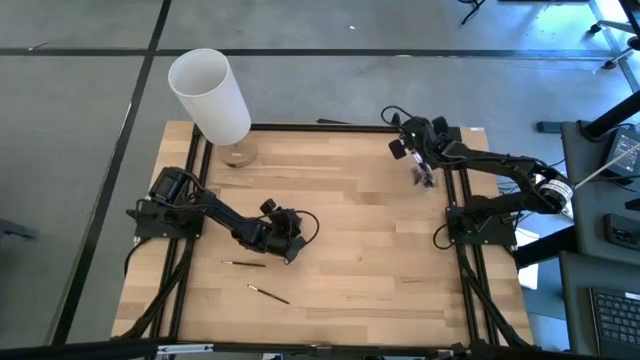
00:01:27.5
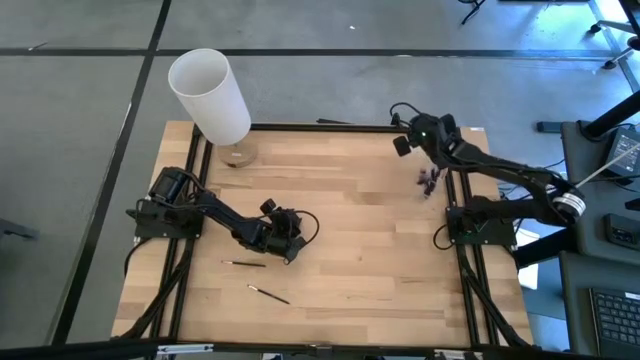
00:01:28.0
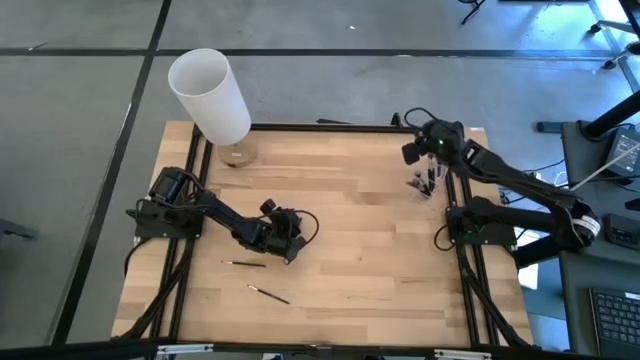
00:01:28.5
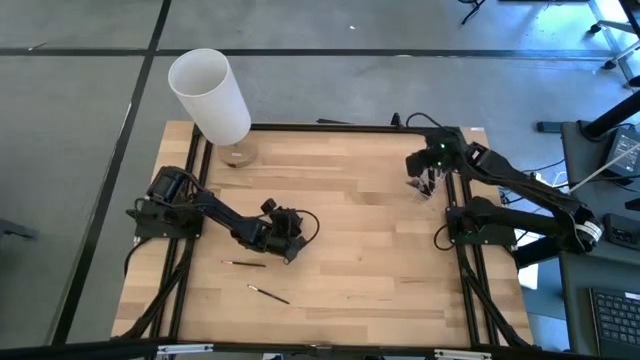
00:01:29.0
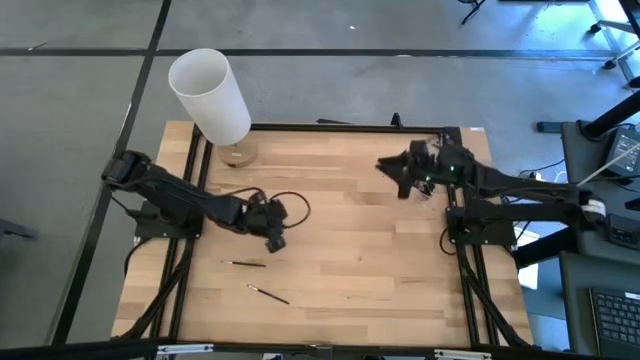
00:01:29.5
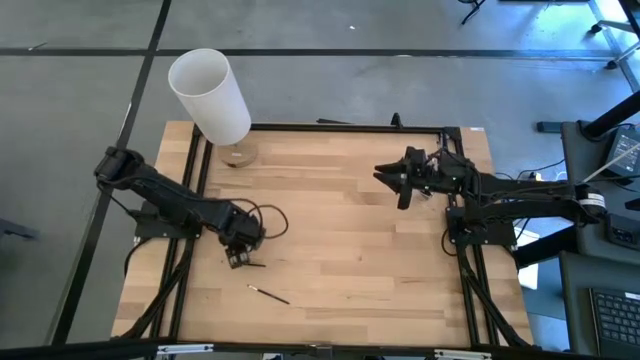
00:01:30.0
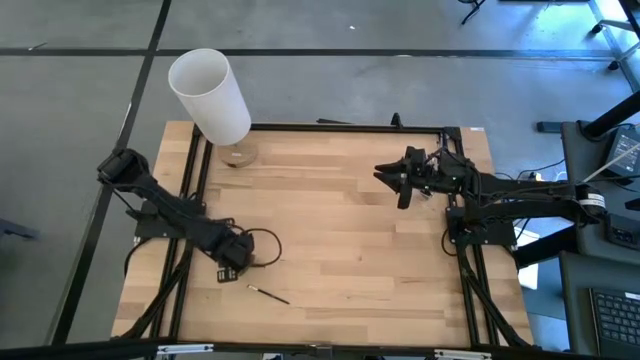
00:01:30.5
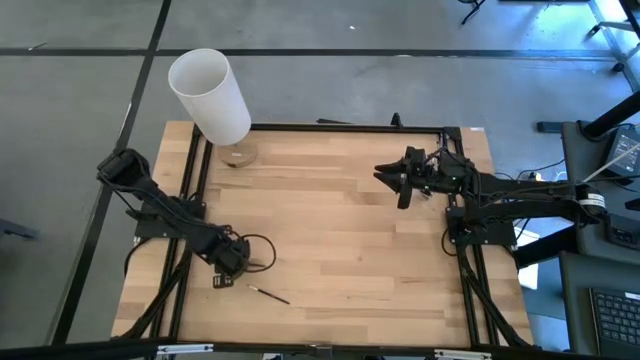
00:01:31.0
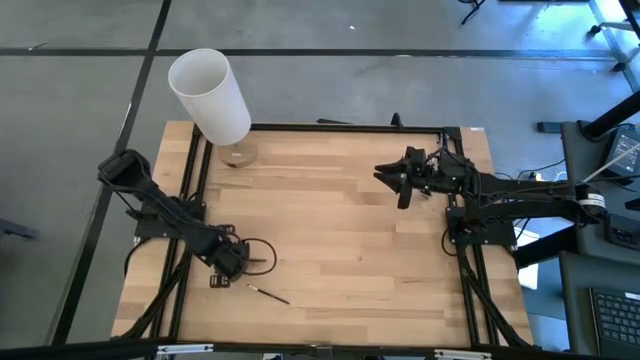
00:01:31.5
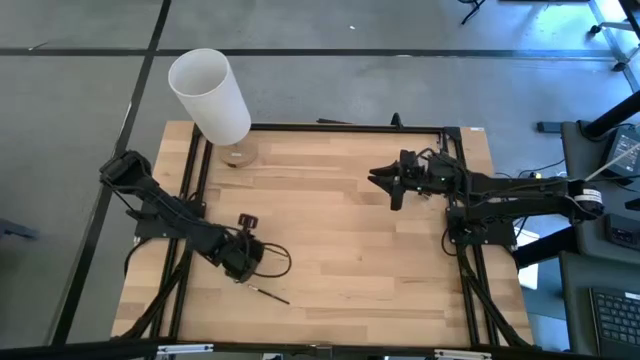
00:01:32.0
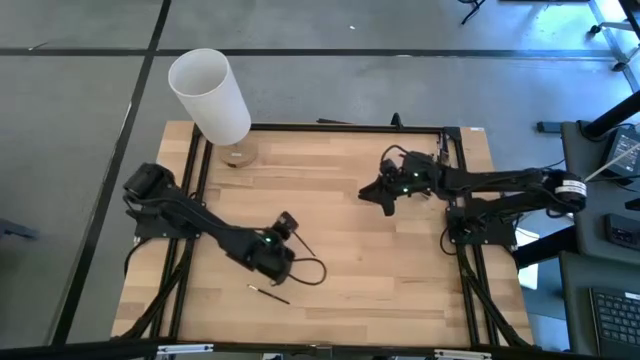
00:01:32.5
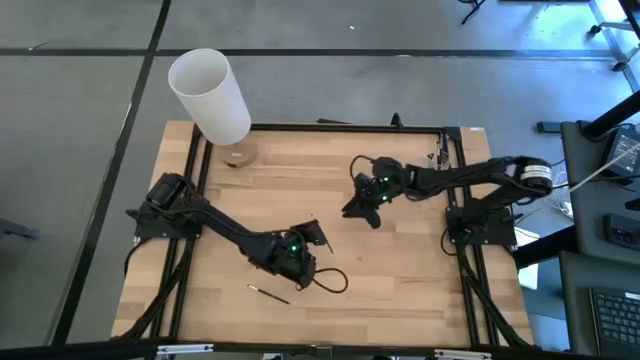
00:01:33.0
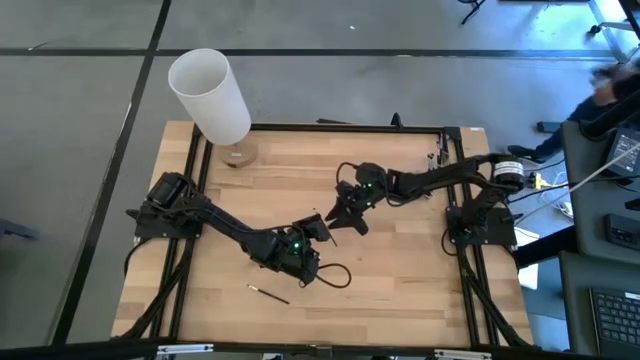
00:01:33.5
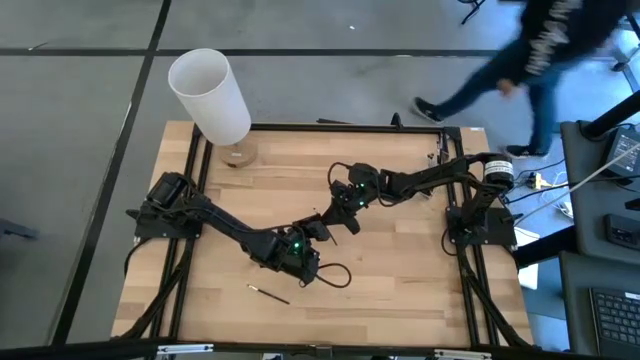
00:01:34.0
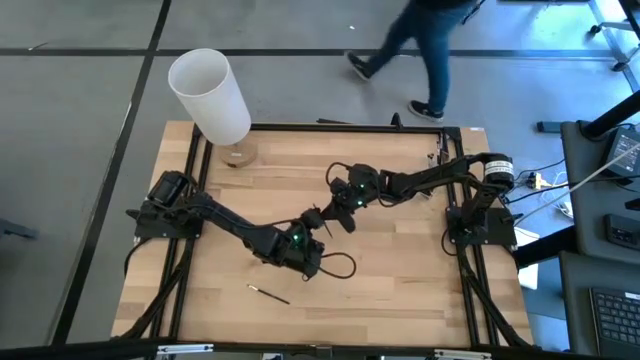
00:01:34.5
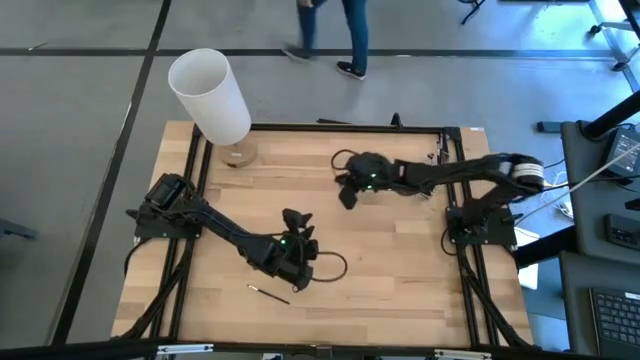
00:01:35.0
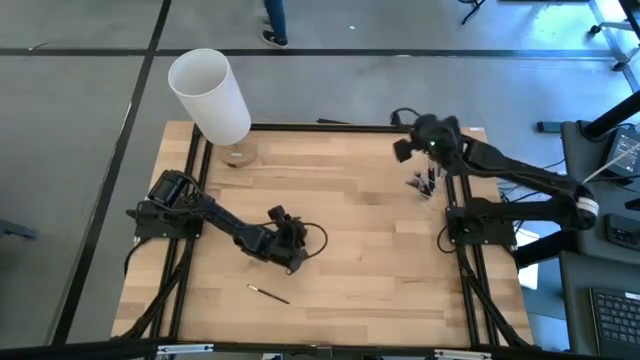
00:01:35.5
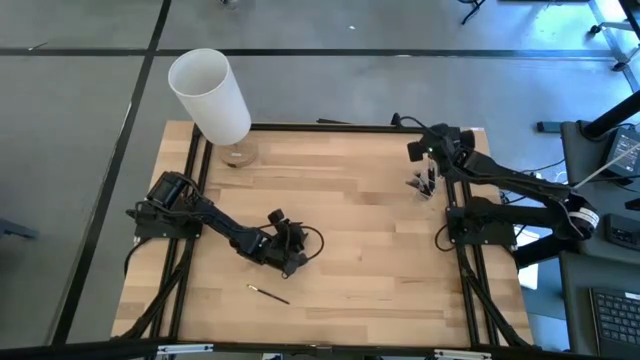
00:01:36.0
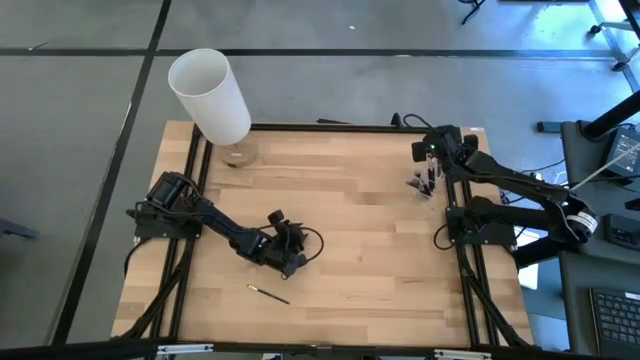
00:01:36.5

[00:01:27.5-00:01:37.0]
Task: Sort items
Put the lip brush into the top section of the transparent organizer

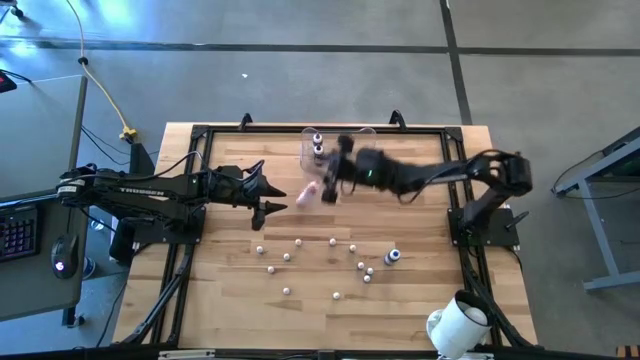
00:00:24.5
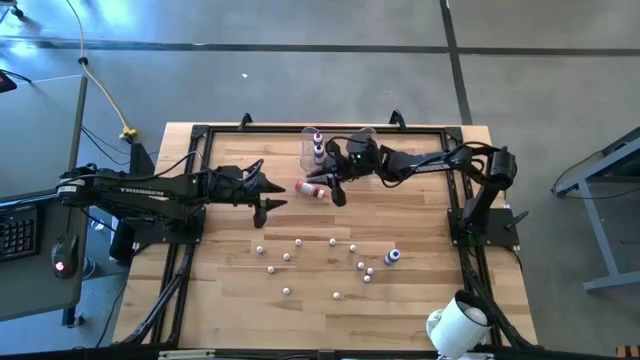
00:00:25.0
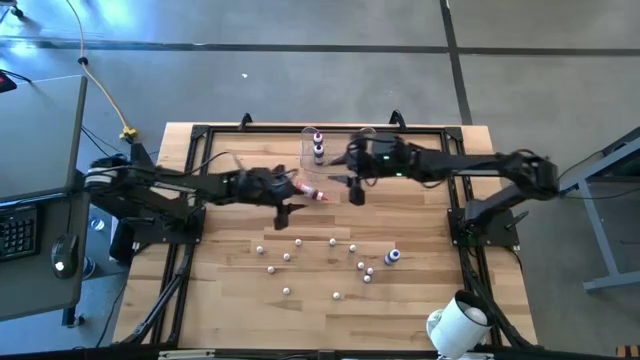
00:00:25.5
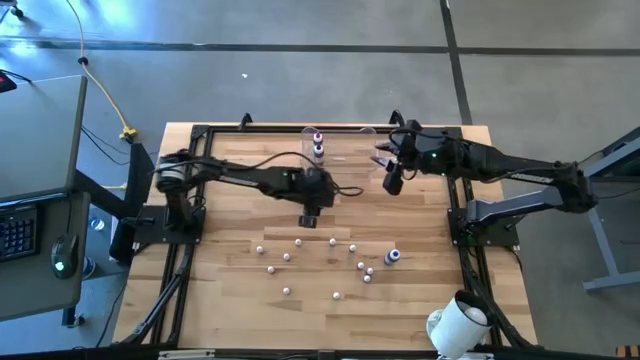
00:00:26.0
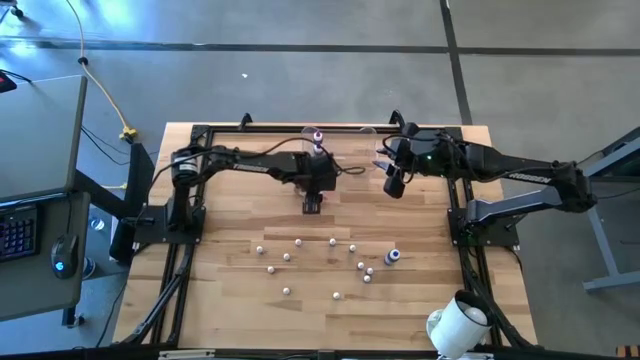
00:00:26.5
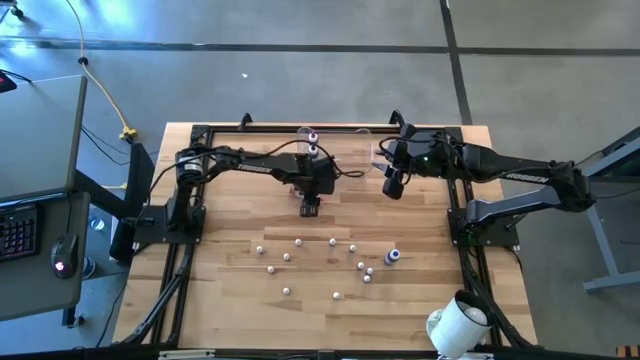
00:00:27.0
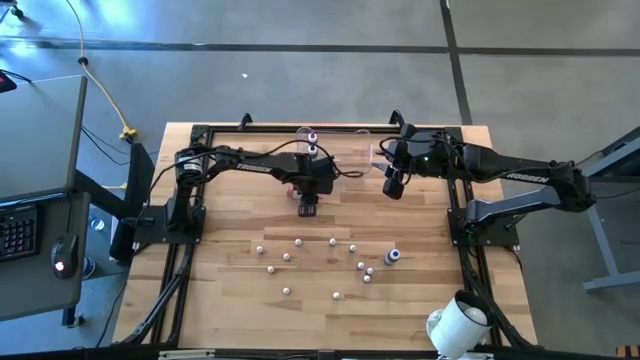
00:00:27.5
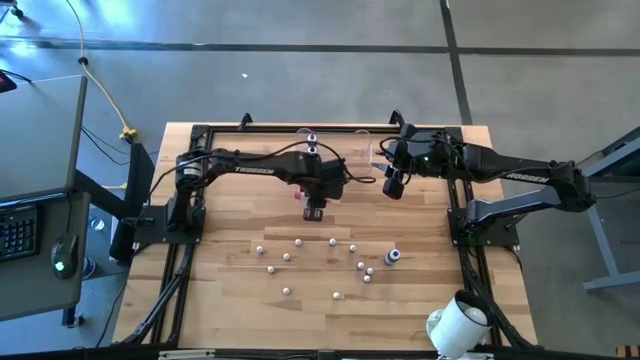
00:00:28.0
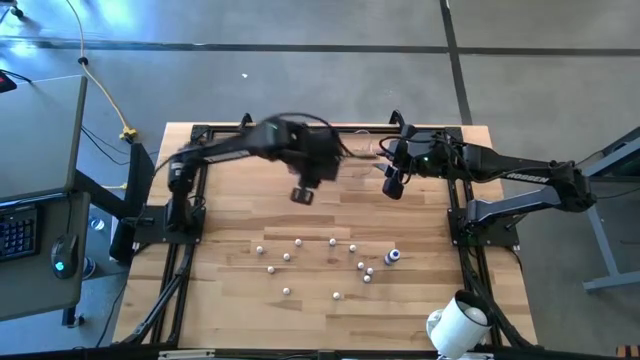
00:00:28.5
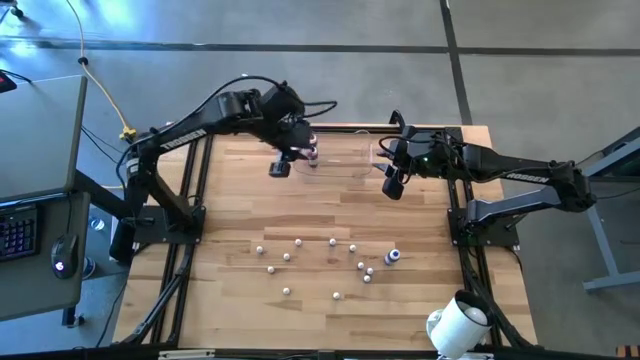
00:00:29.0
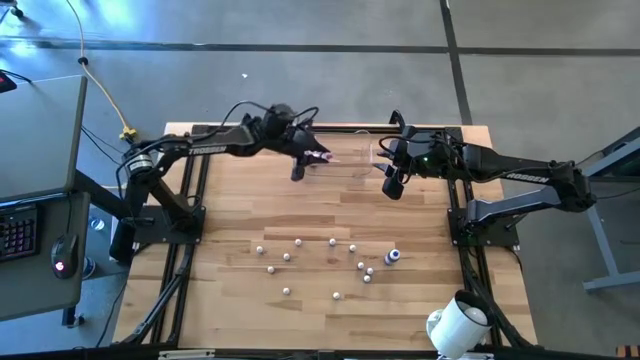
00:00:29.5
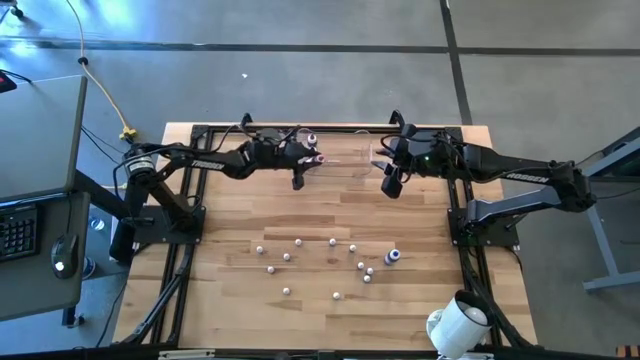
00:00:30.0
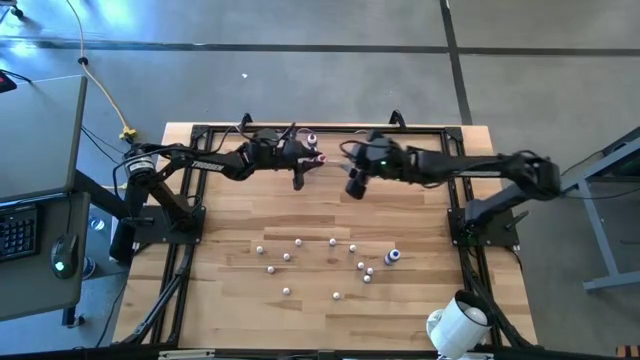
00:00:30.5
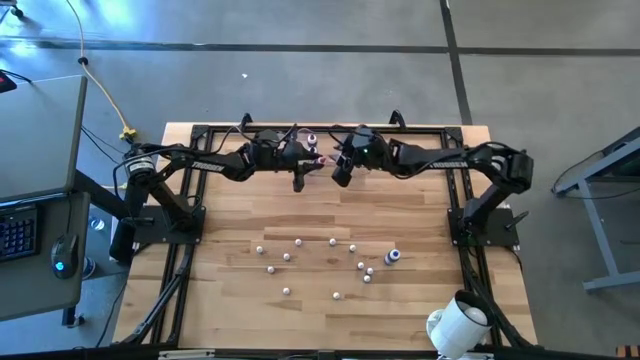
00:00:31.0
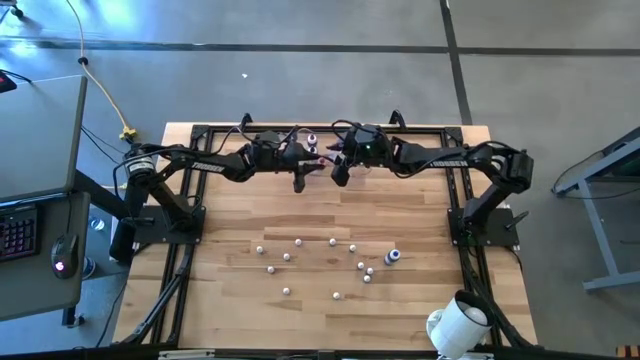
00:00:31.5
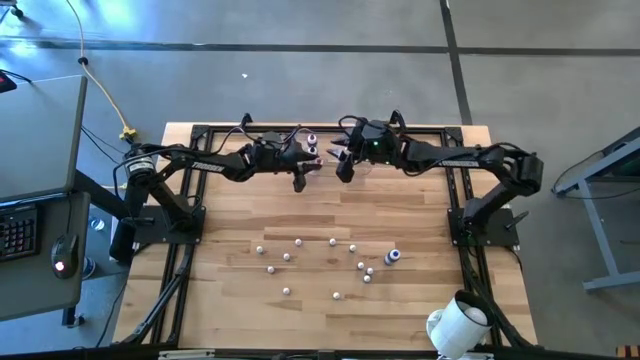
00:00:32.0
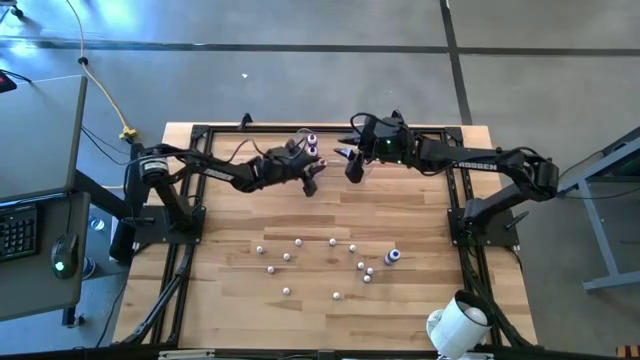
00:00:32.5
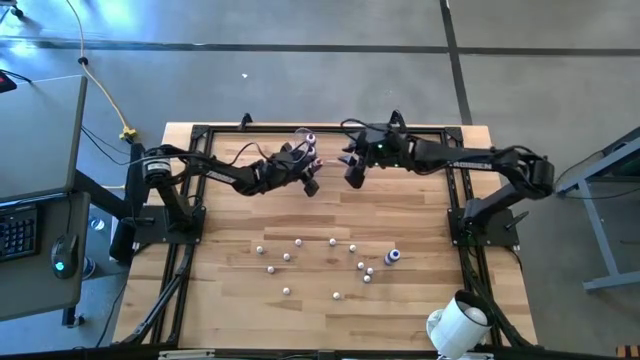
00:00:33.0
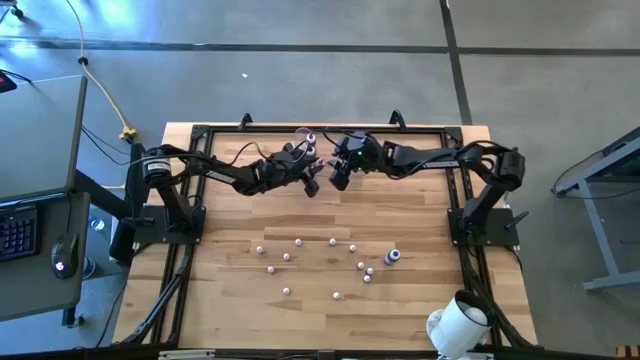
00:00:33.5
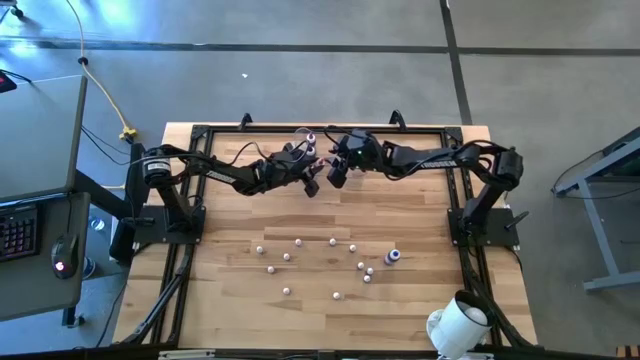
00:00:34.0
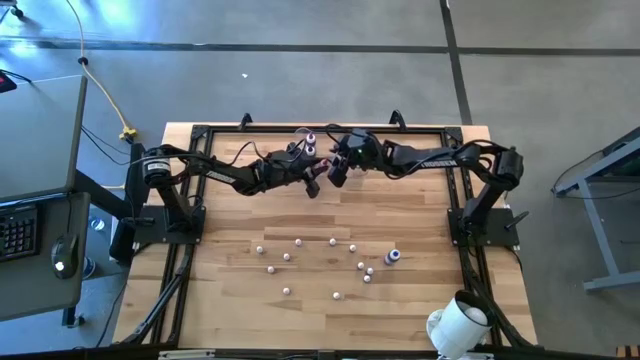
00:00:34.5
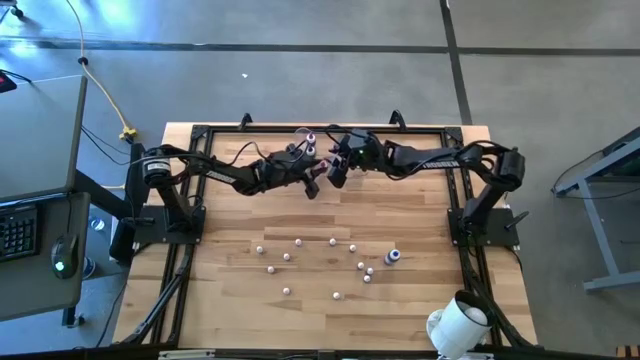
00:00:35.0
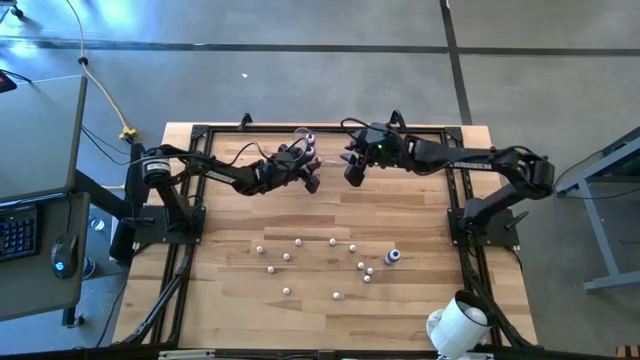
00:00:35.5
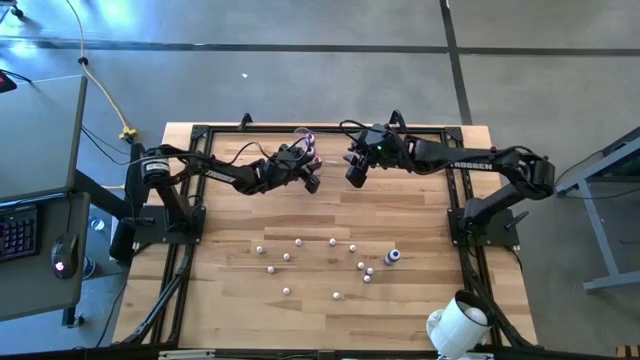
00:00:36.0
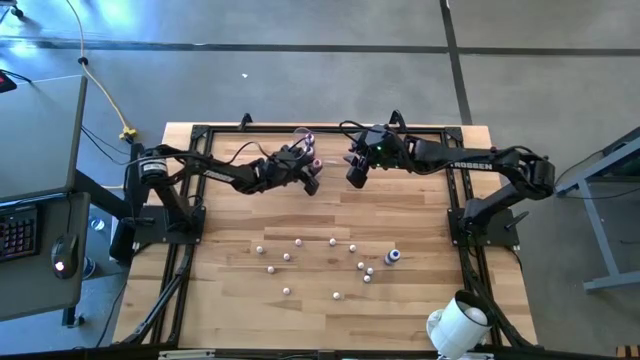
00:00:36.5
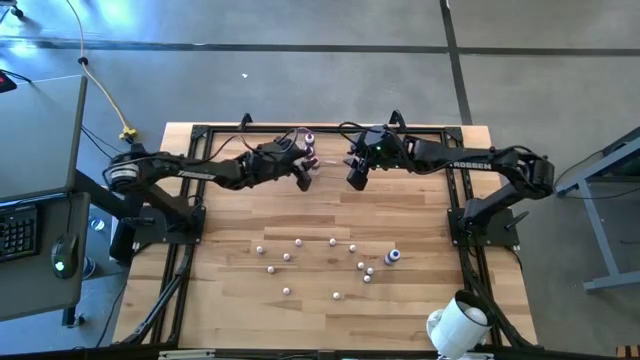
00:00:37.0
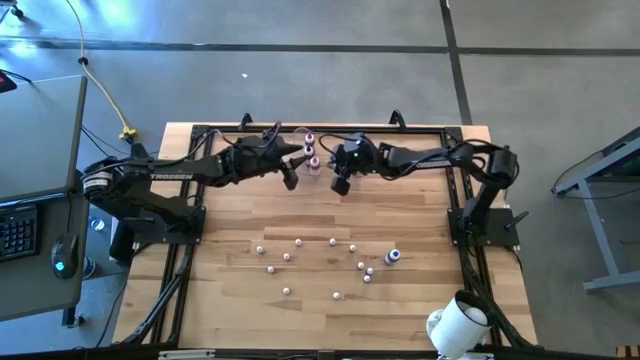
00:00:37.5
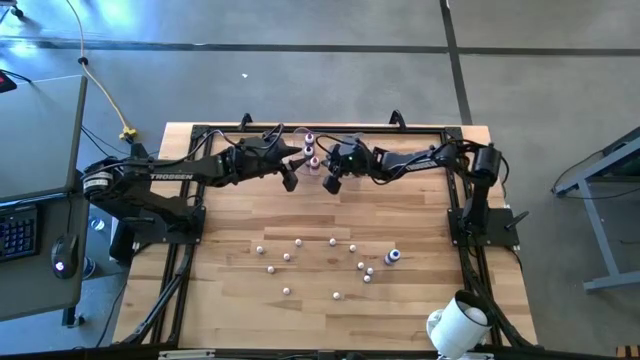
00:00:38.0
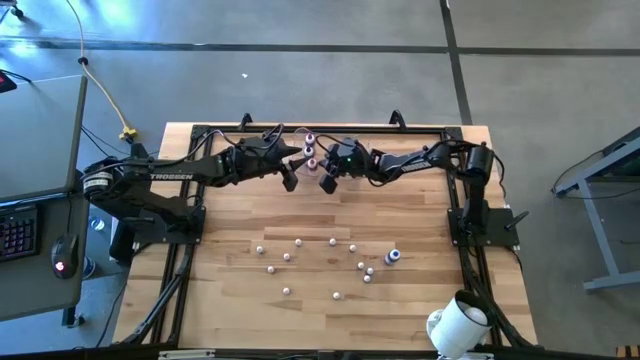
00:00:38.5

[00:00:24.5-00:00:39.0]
Task: Pick & Place food coloring
Put the pink food coloring into the transparent bin
